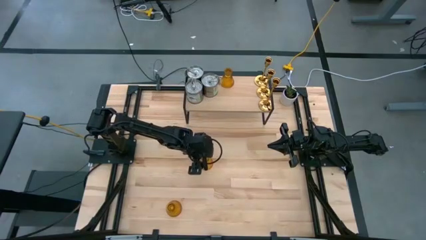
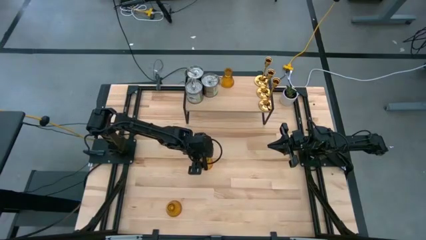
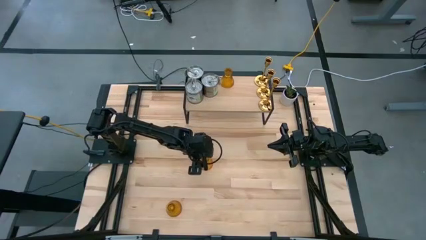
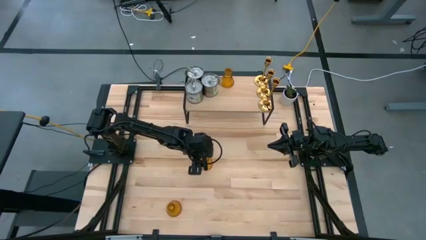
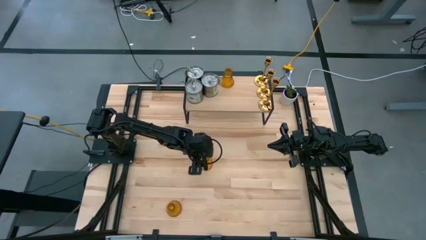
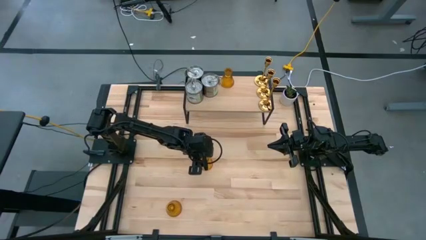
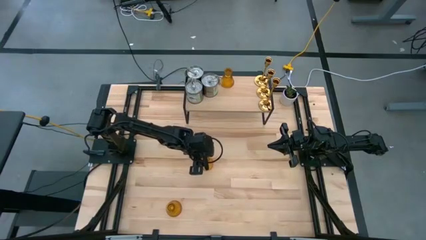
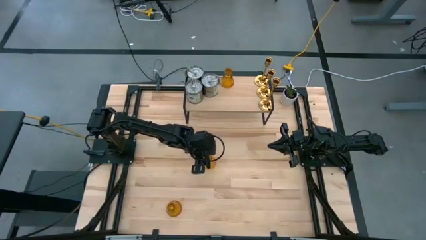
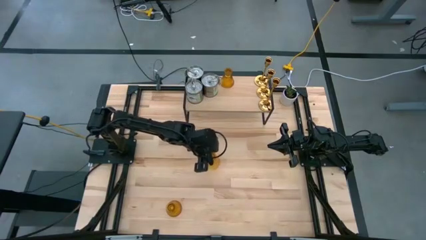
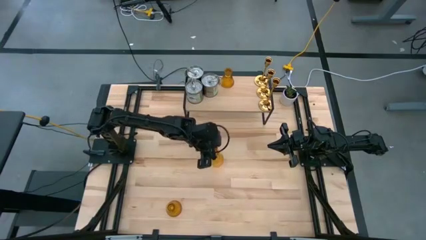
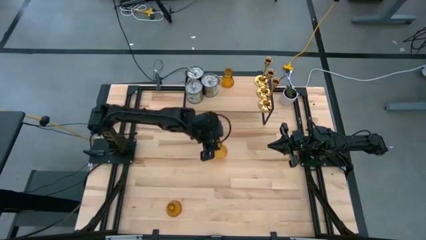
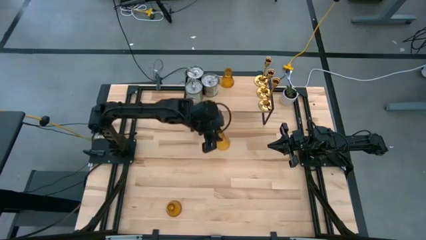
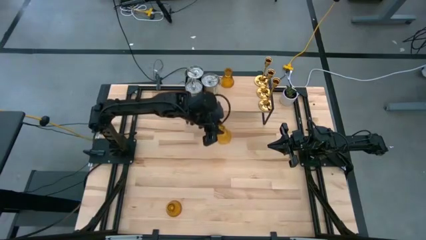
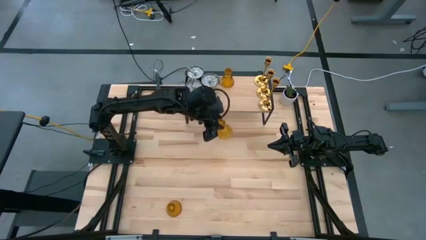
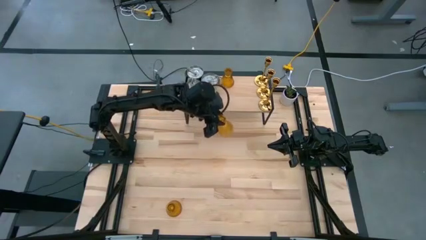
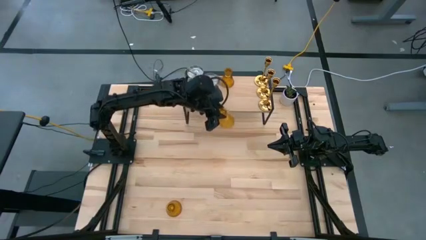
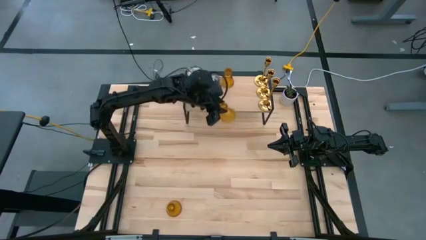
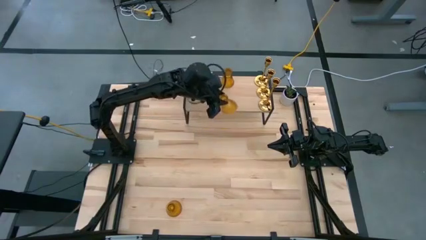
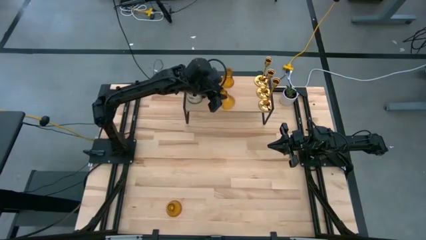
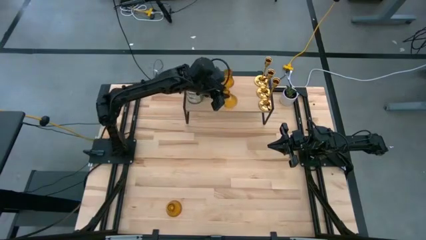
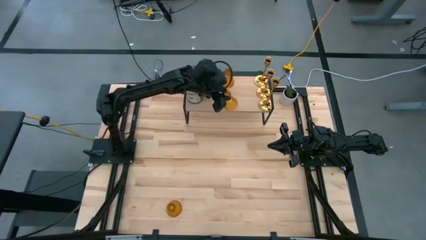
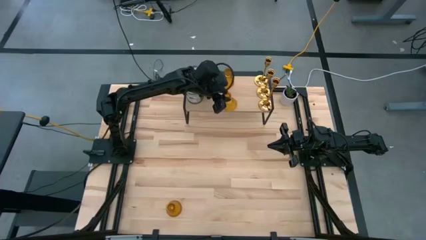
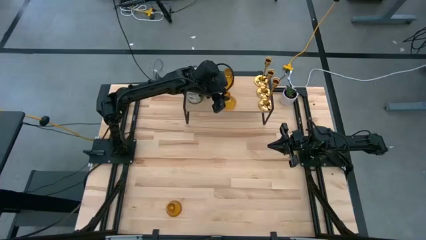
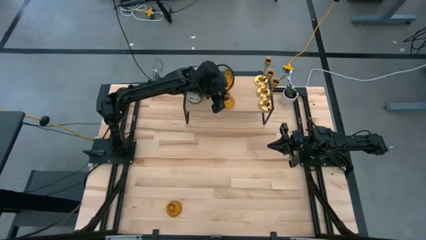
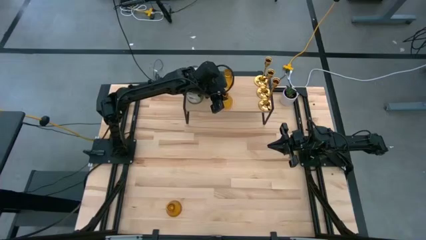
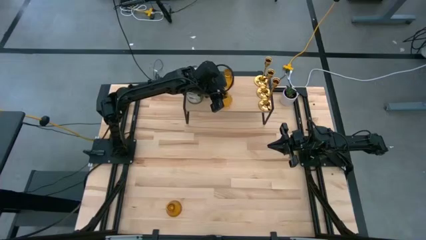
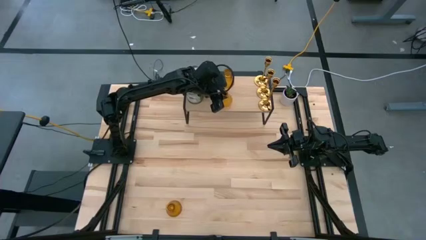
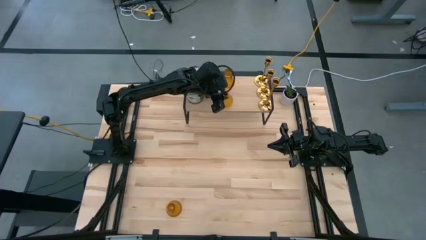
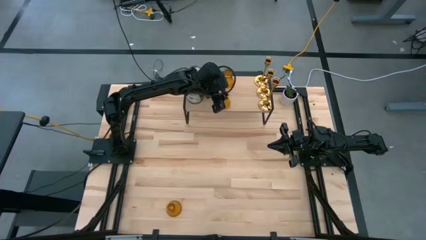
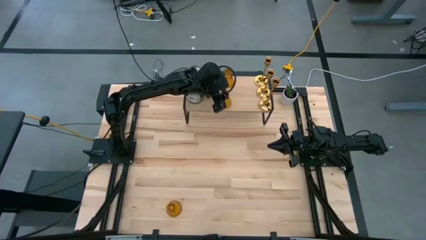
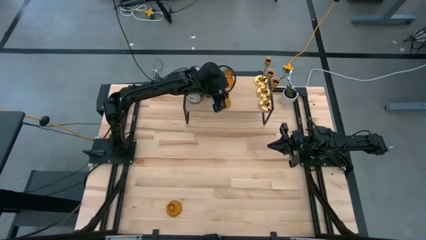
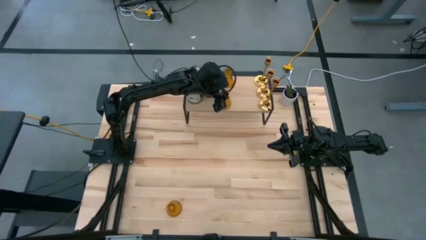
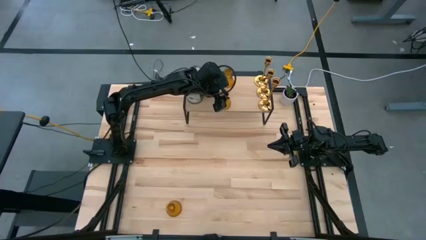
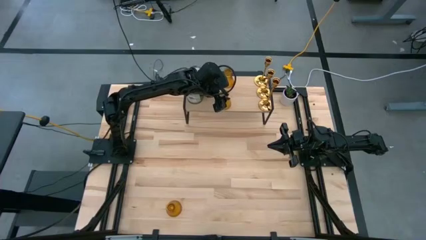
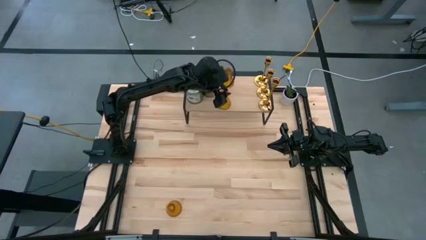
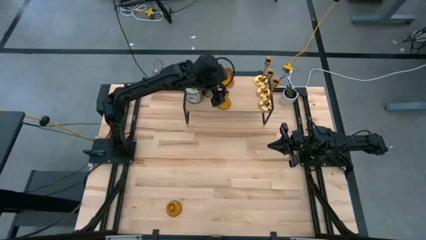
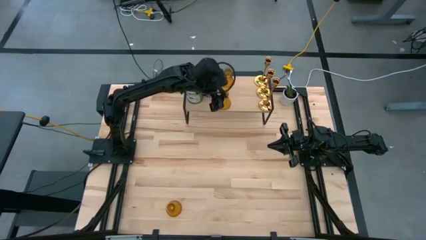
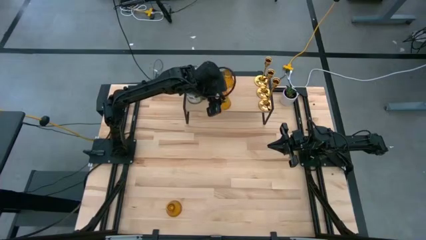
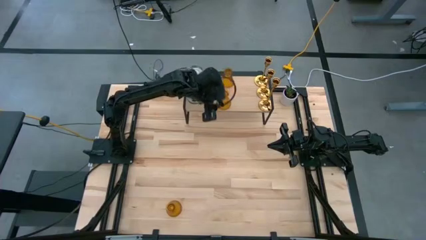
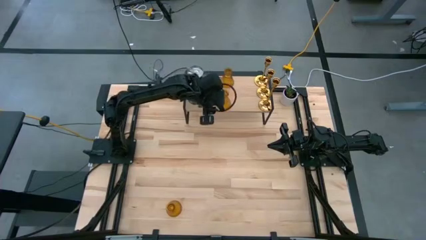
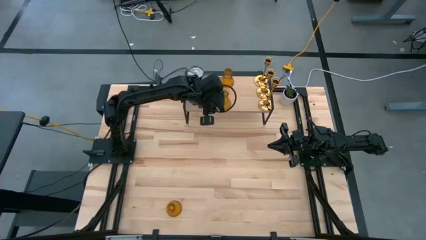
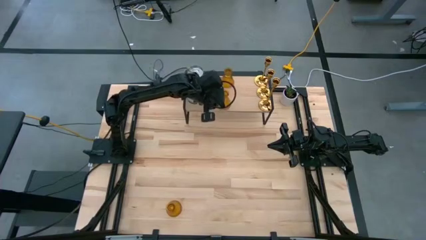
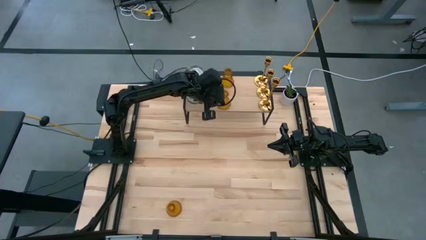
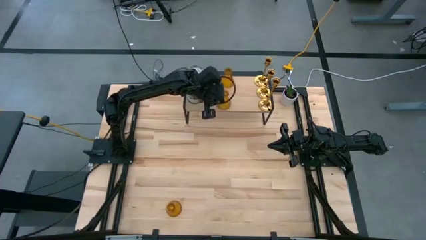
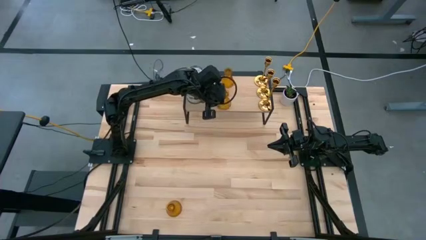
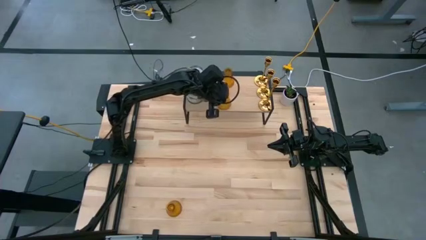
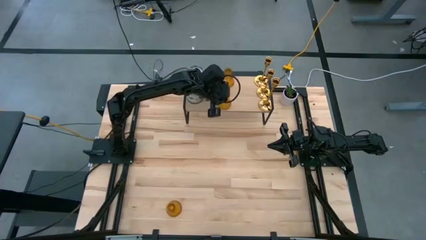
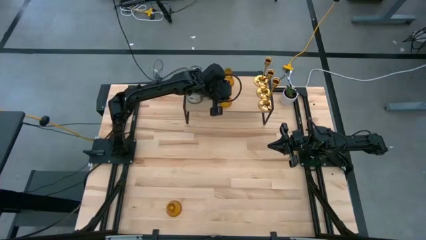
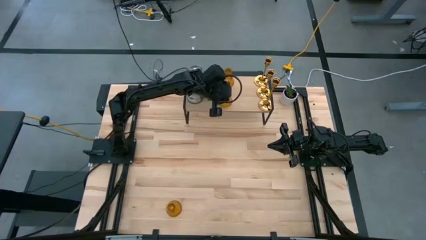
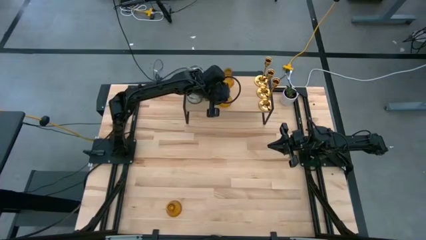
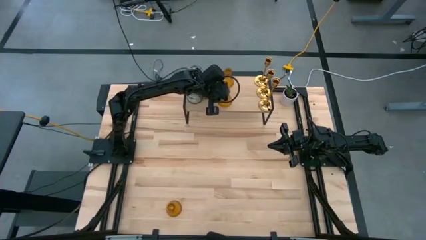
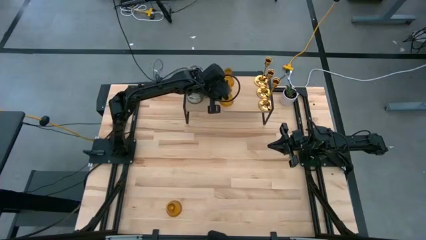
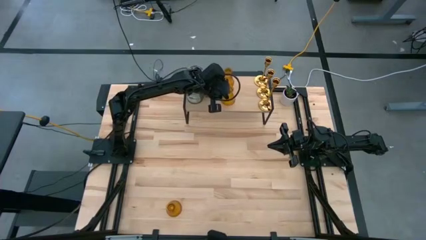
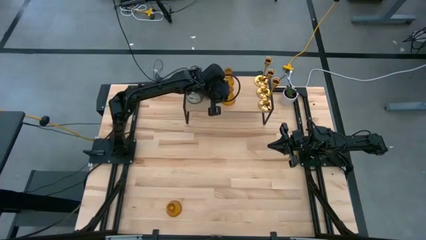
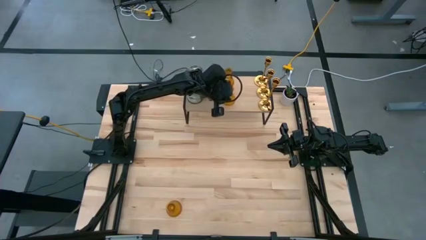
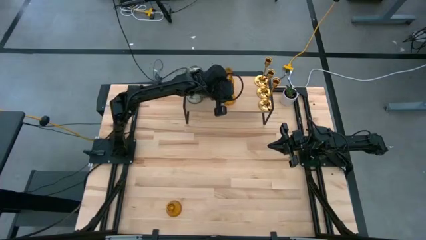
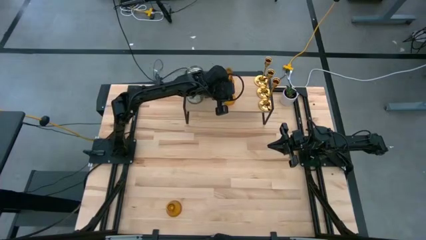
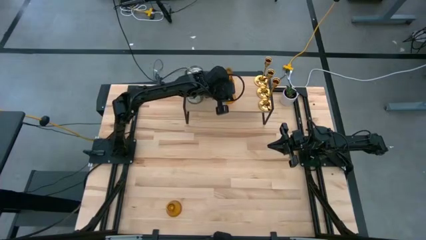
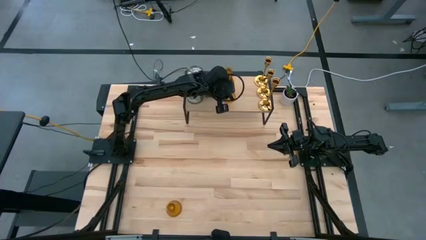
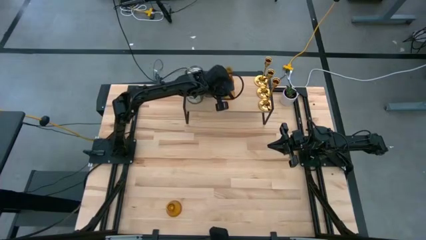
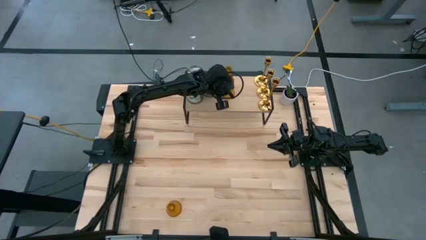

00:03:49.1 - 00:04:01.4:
Task: Pick & Place candle stick holders
Put the top orange glass candle holder on the shelf aligned with the other orange glass candle holder

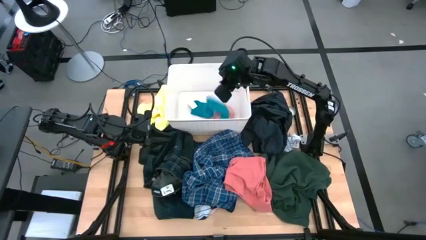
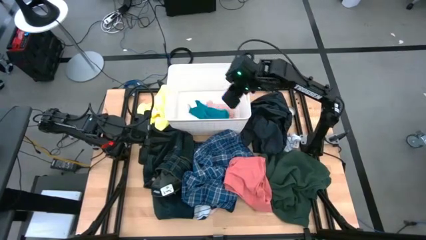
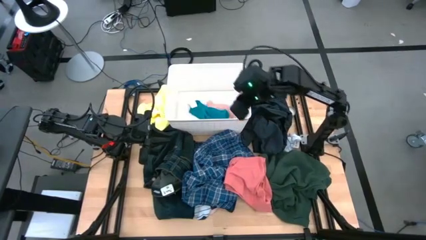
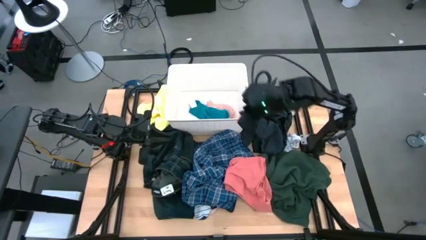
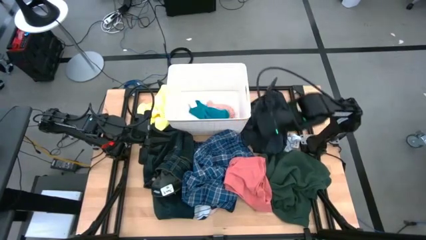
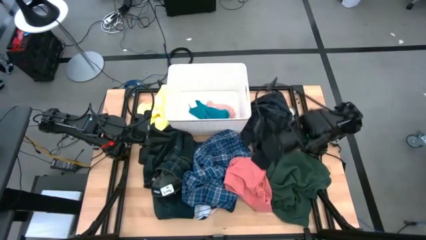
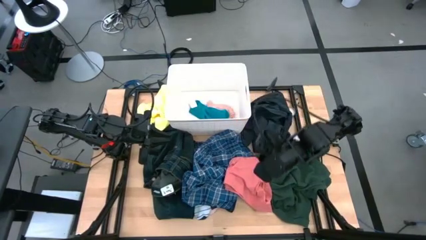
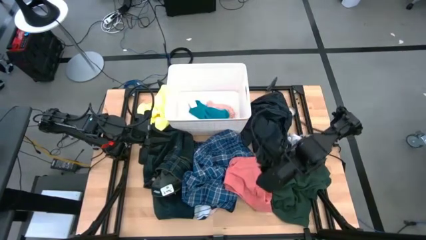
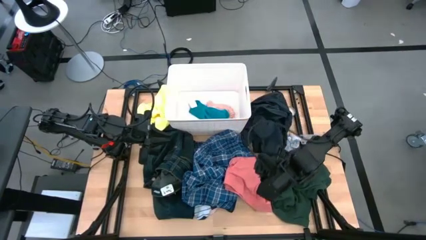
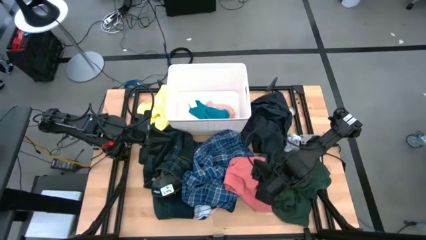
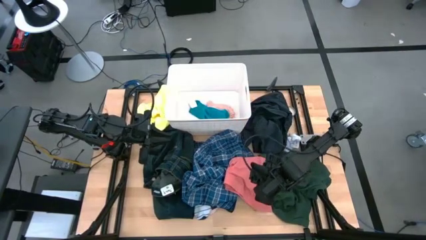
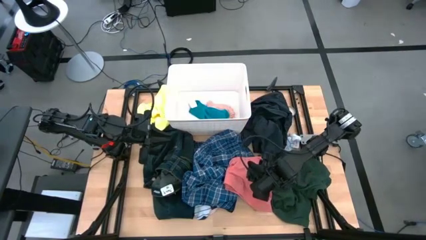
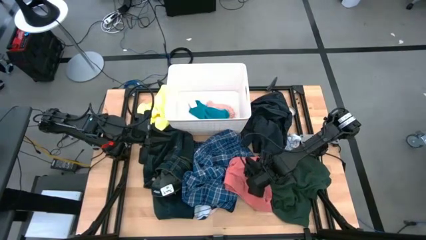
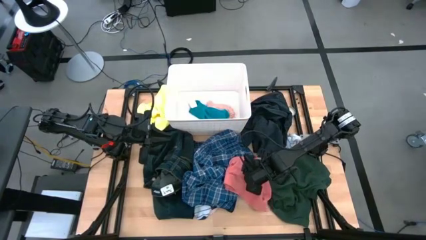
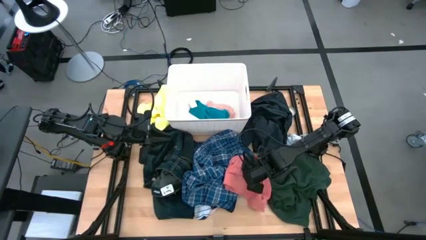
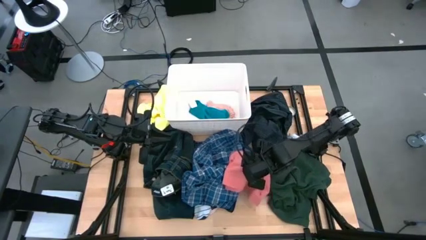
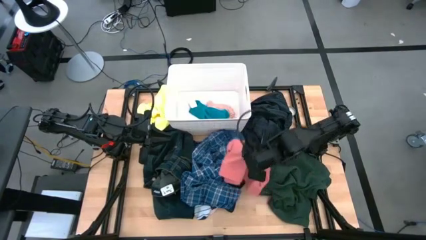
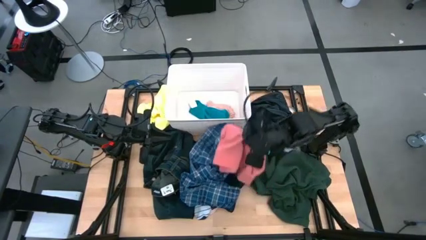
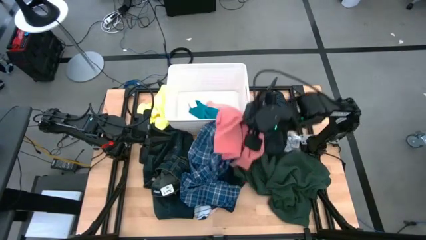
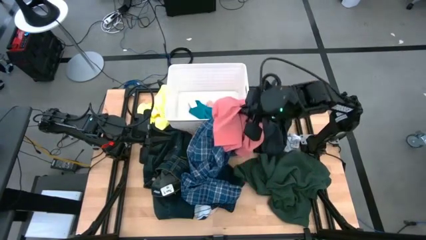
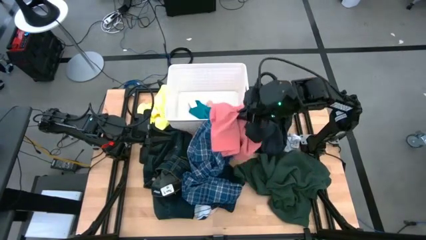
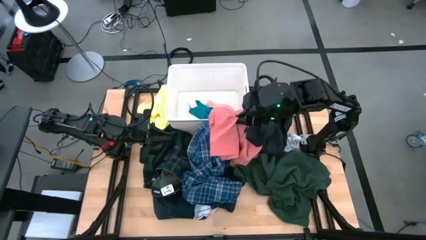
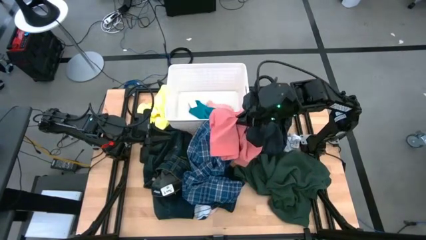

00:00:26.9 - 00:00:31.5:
Task: Sort clothes
Put the pink shirt into the laundry organizer
